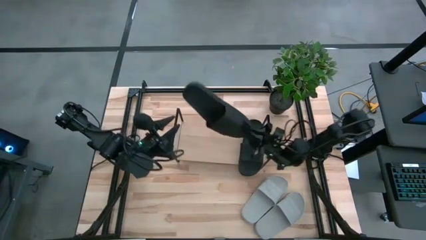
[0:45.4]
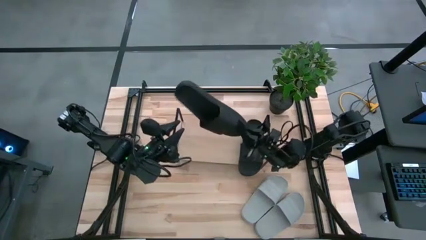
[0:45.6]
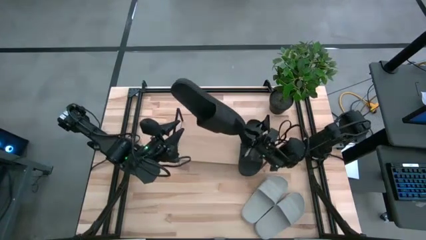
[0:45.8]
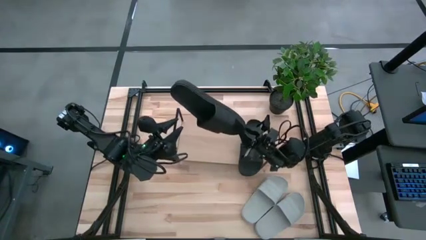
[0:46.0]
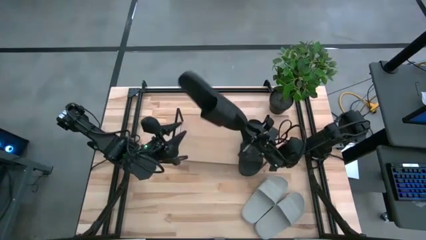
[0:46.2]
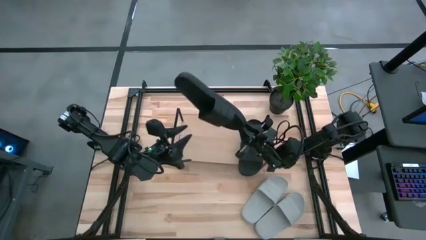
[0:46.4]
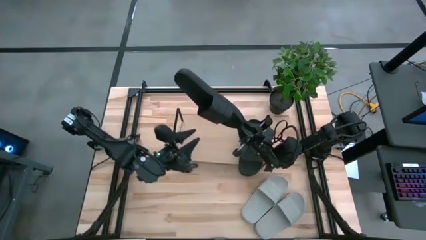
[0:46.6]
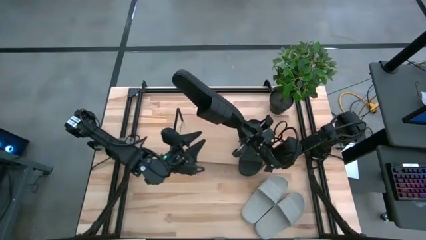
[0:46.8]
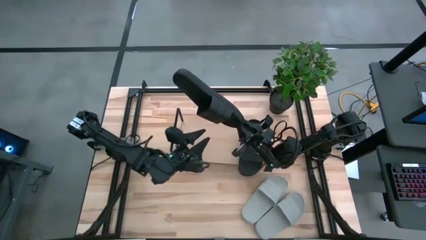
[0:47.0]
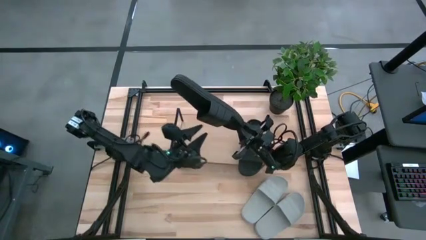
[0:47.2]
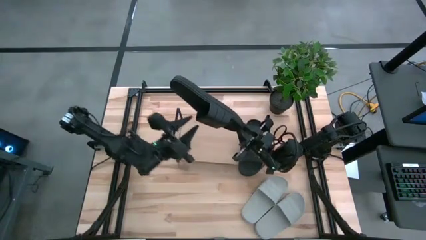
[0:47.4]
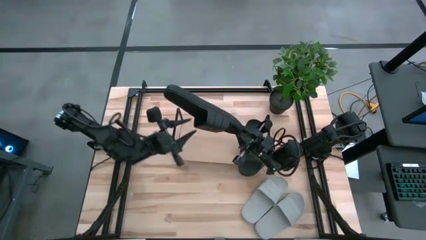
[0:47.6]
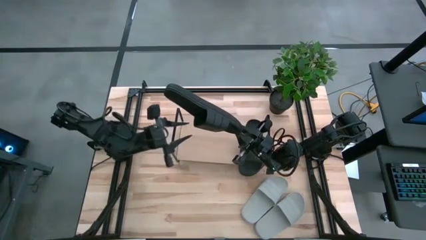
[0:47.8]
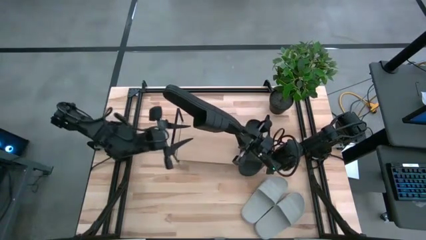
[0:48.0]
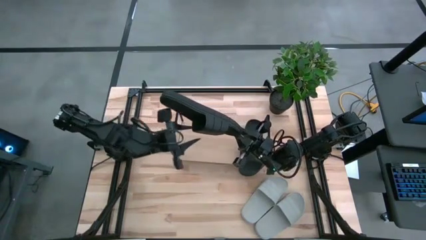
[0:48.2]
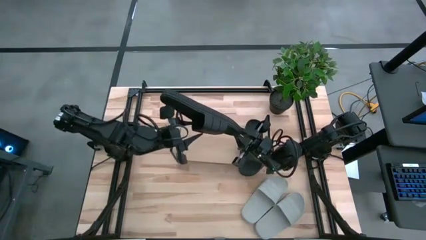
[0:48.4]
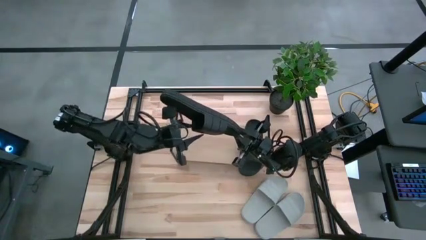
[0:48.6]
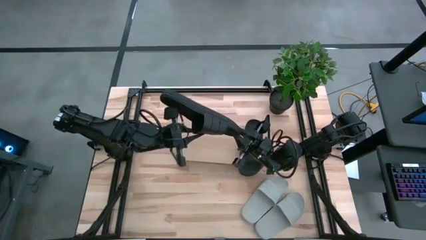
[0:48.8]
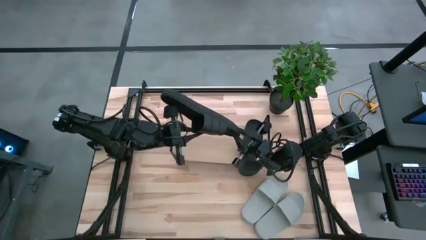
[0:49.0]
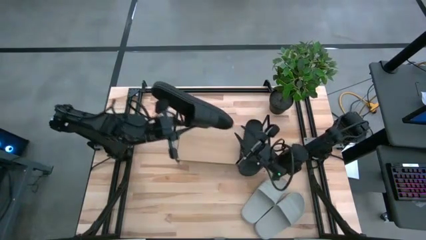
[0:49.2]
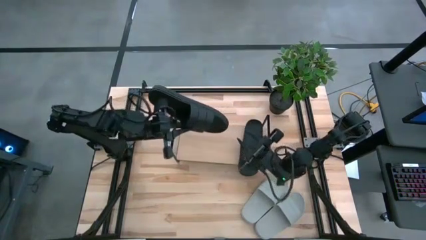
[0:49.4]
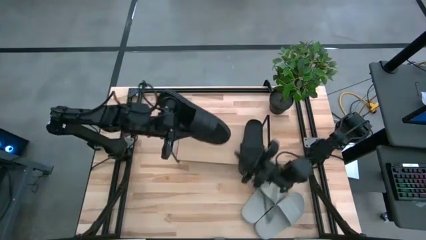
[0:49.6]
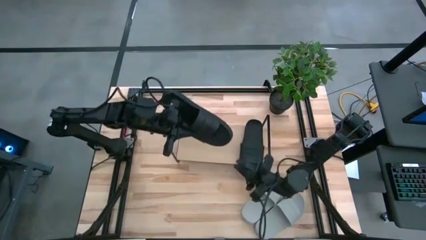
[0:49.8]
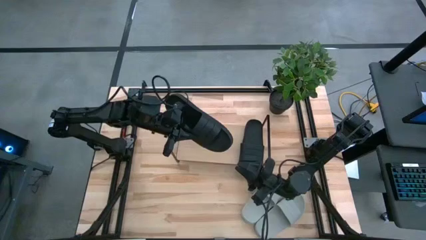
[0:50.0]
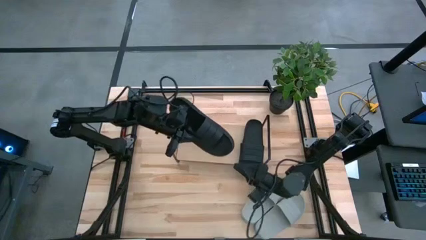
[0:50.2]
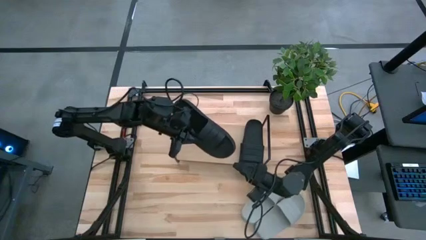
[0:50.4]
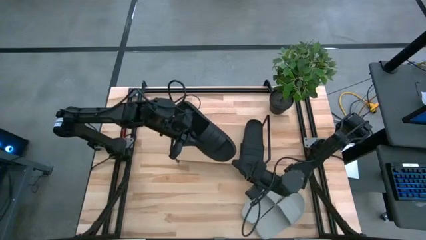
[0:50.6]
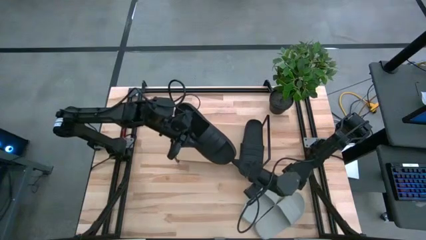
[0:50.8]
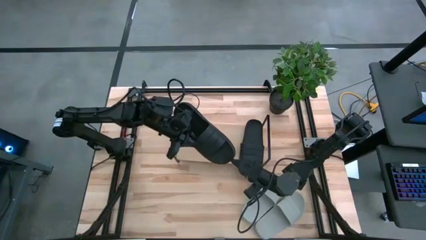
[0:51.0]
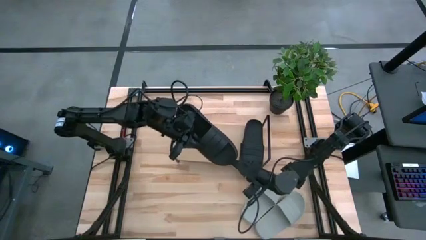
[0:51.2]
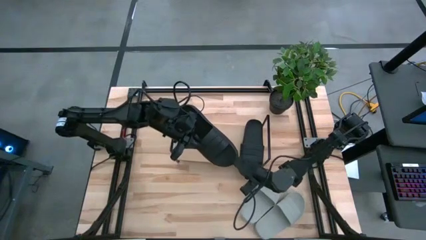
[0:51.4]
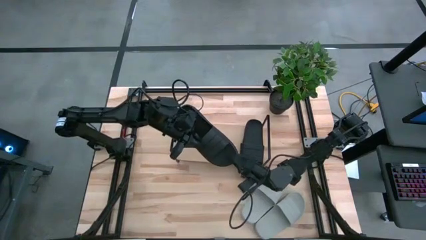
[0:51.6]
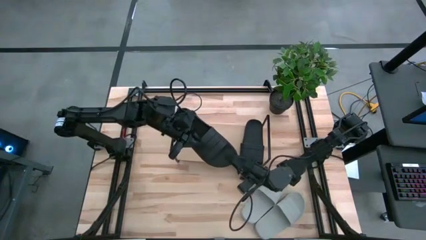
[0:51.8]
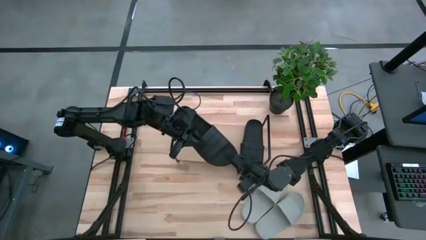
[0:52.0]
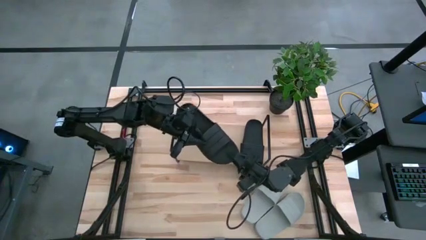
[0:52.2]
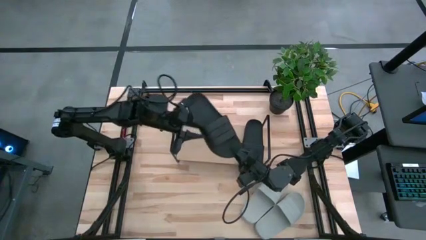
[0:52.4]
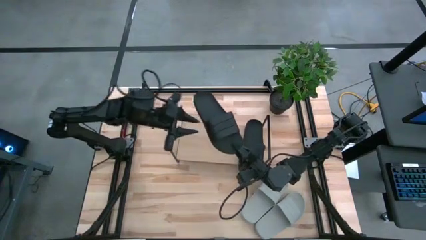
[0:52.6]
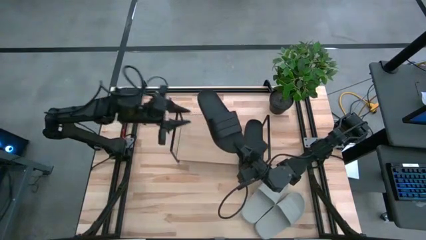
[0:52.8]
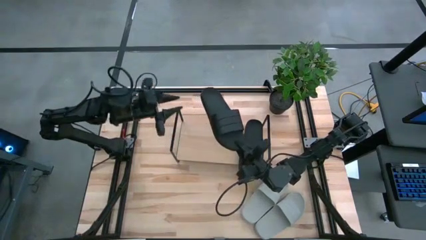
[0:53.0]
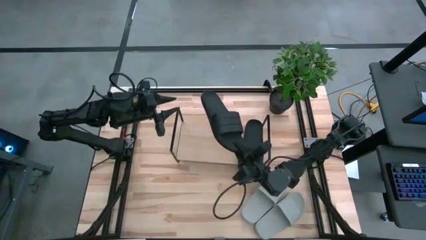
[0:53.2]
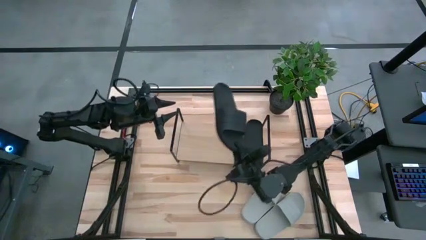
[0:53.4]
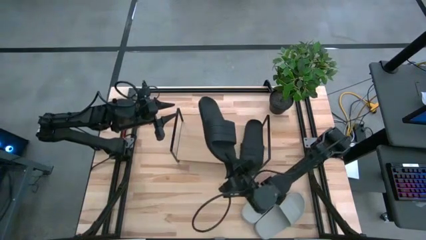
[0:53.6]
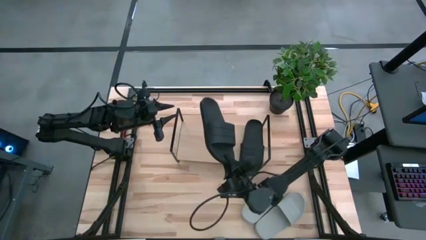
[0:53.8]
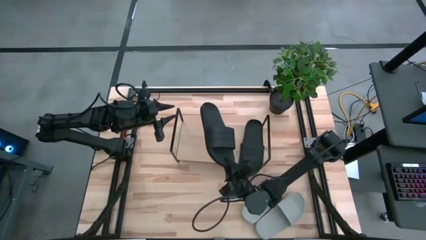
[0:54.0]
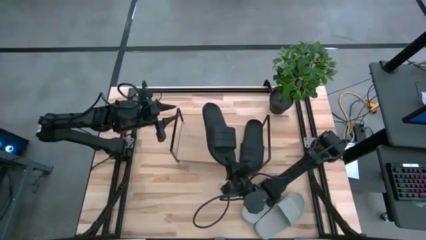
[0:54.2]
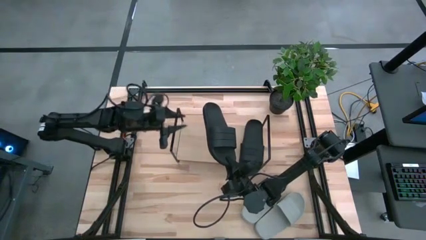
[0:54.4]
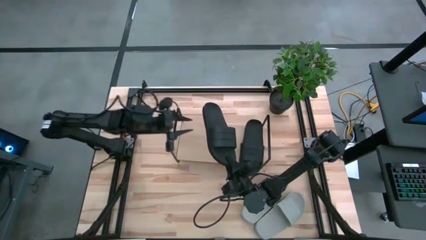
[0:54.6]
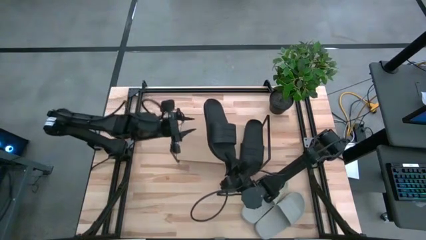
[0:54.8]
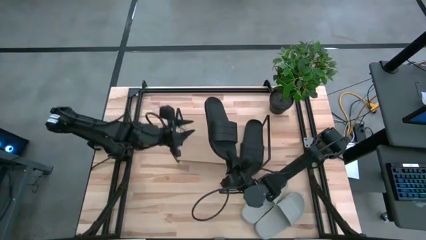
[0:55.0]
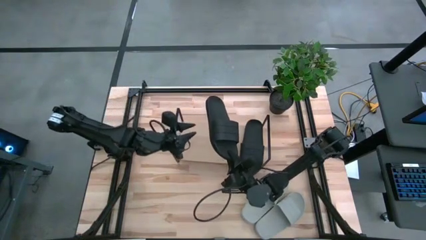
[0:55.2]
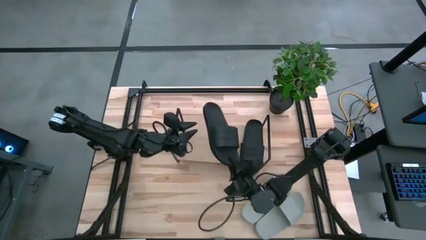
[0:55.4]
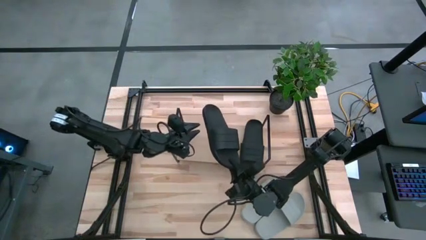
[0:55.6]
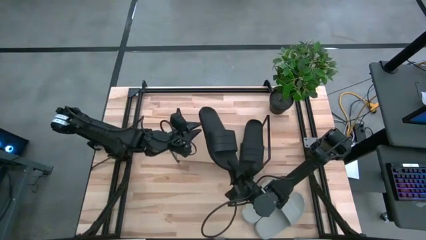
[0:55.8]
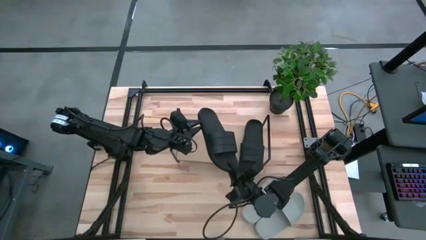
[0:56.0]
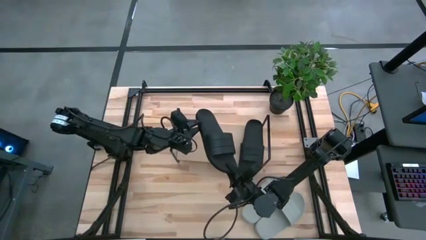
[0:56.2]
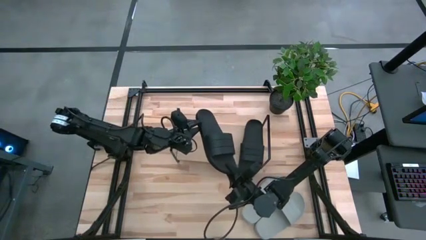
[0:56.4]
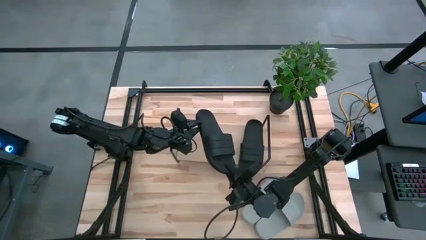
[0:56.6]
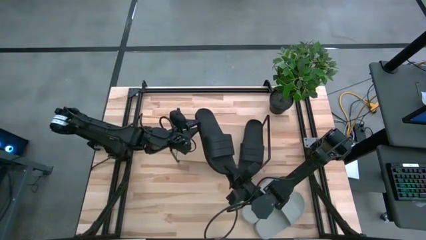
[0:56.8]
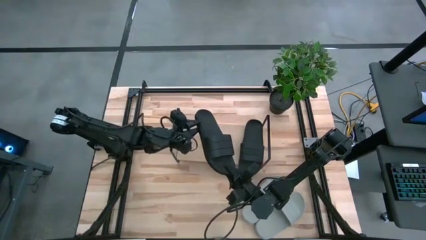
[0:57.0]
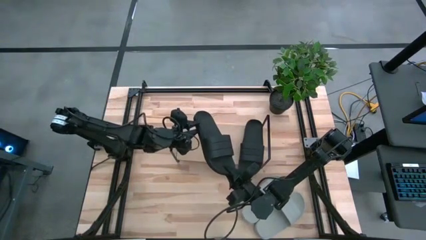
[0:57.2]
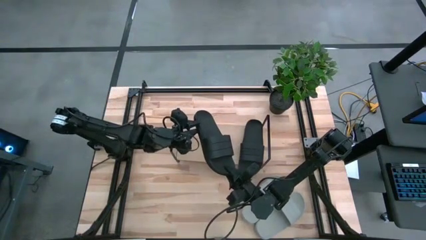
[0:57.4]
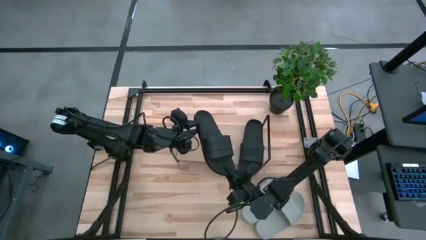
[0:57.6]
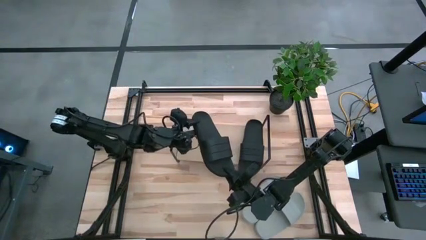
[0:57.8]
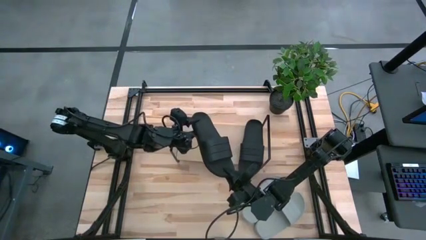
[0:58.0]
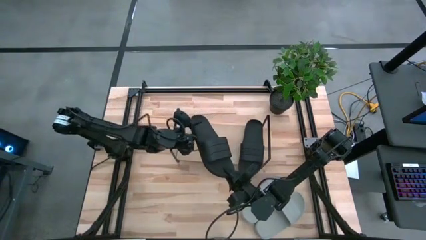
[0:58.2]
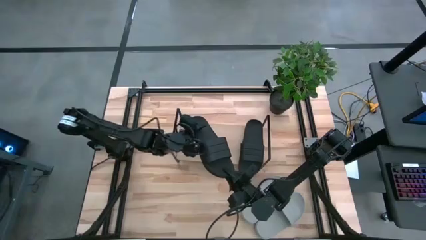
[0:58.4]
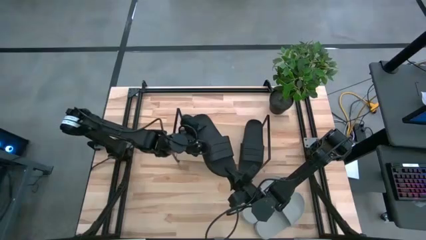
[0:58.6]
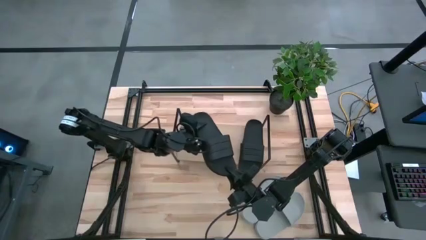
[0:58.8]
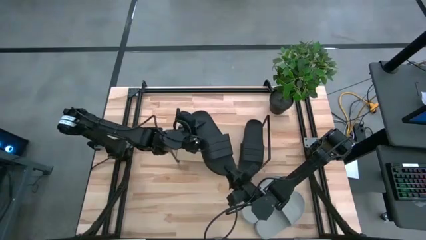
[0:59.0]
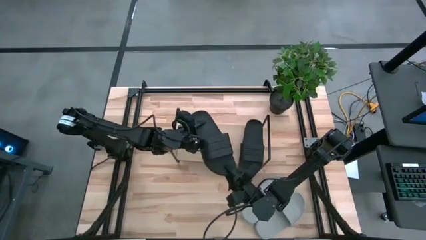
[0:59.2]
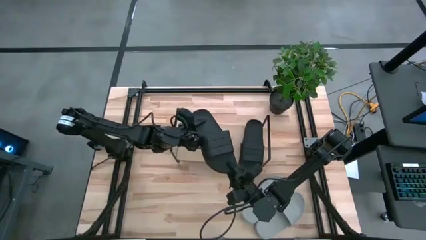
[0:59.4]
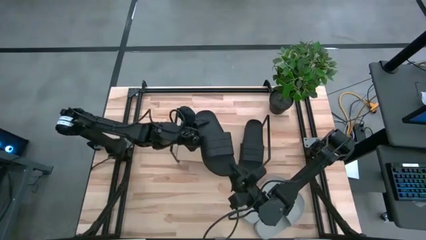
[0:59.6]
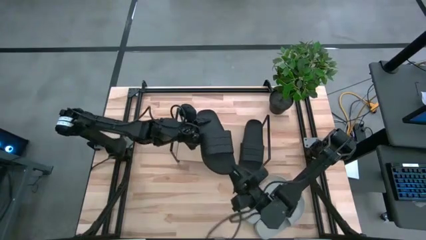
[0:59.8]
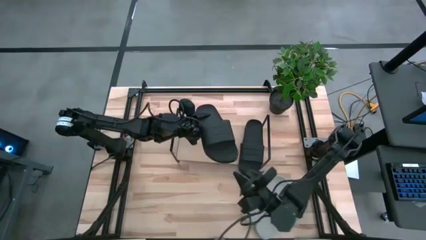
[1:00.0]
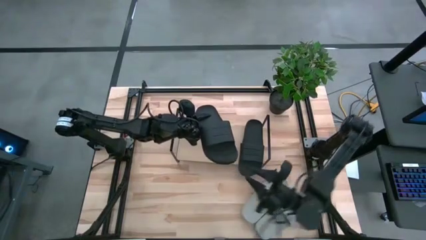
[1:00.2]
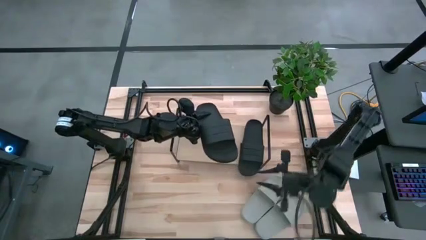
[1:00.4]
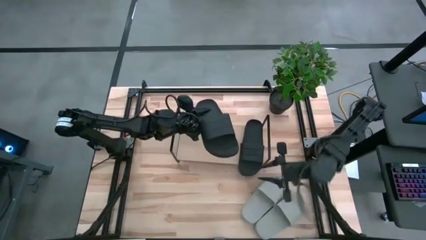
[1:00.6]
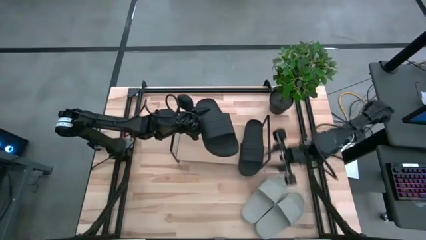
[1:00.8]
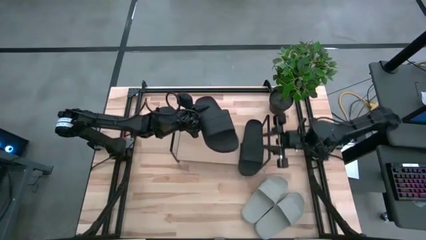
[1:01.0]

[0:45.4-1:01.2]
Task: Pick and place slides into the shelf
Put the black slides on the shelf
